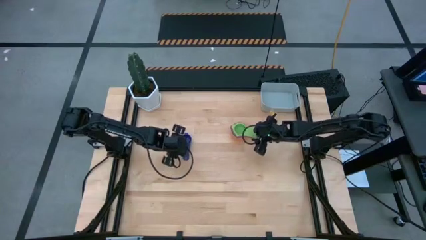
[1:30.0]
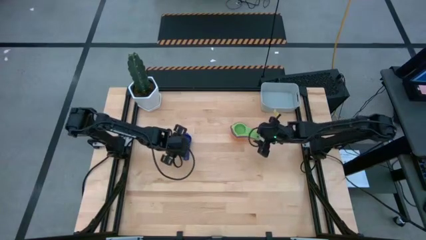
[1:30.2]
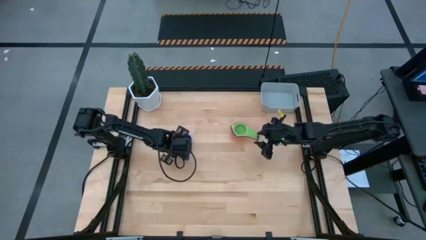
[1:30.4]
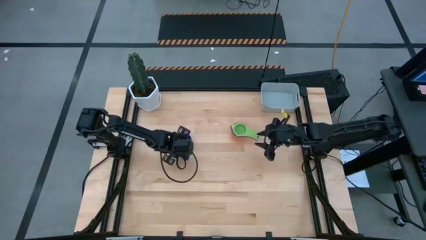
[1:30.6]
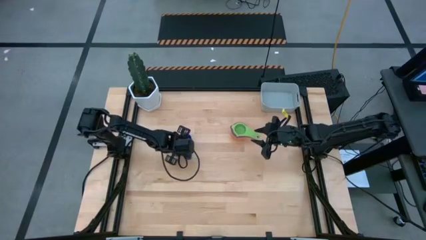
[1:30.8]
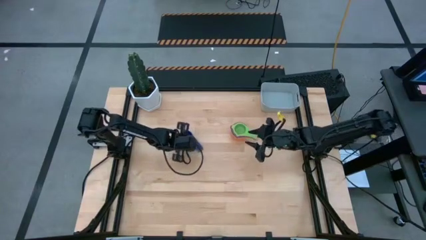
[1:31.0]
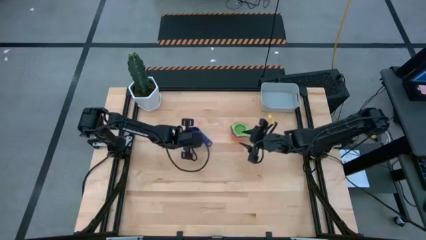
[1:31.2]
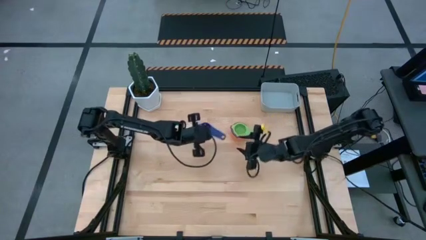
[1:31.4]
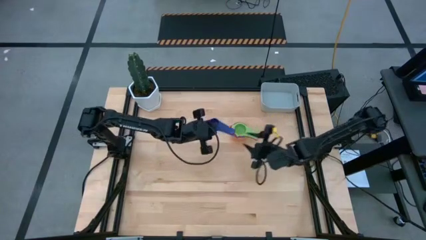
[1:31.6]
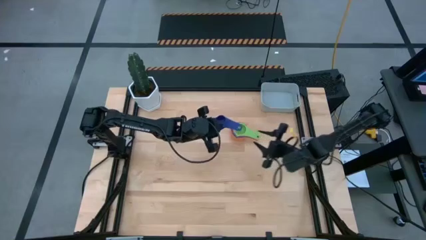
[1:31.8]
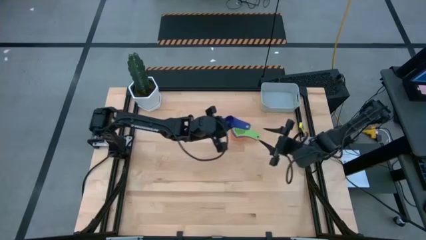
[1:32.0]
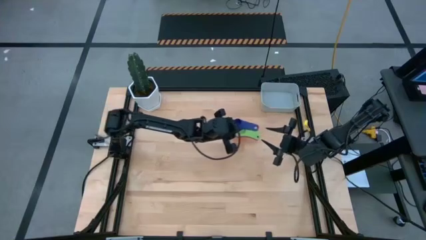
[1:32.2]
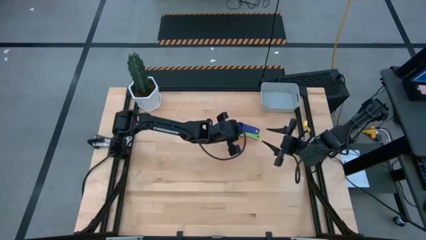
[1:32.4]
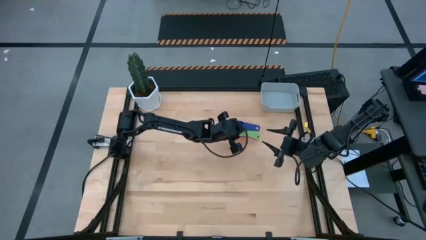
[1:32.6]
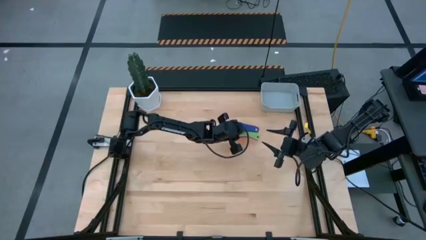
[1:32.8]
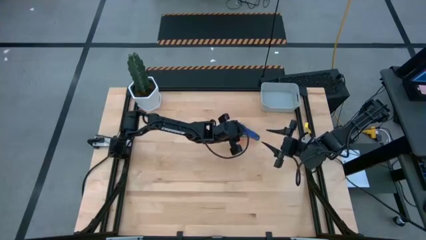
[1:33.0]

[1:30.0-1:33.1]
Task: Nest measuring cups in basket
Stack the dark blue measuring cup on top of the green measuring cup

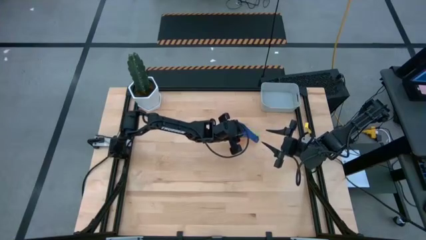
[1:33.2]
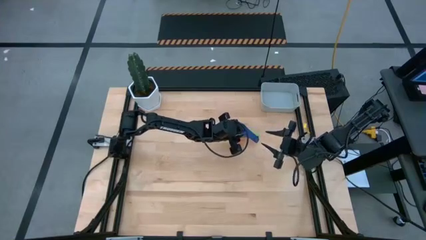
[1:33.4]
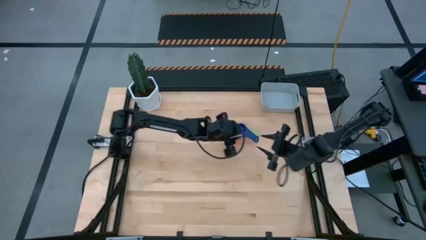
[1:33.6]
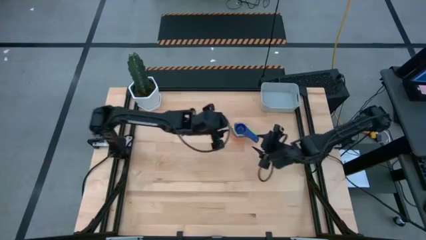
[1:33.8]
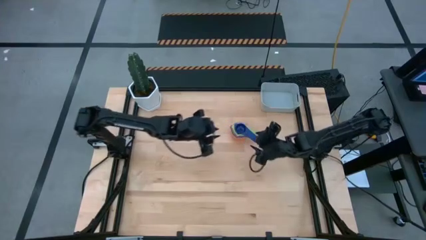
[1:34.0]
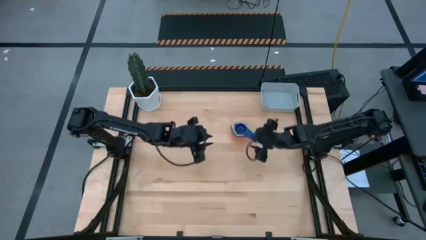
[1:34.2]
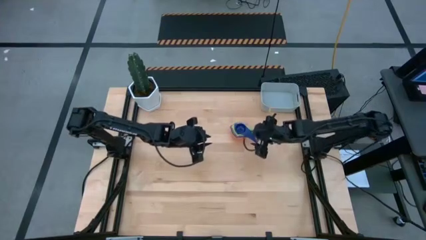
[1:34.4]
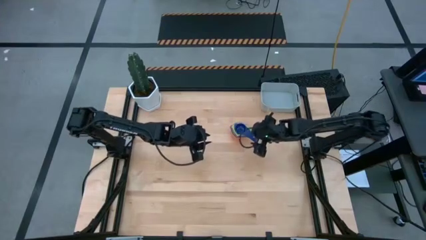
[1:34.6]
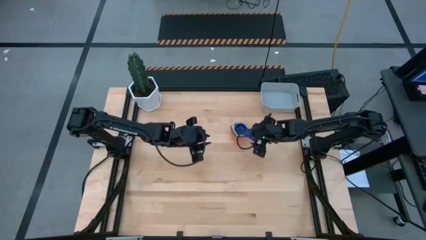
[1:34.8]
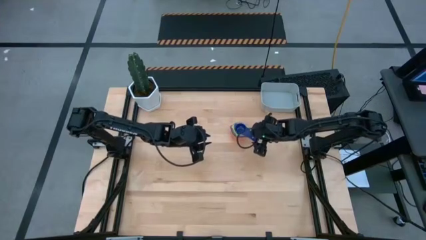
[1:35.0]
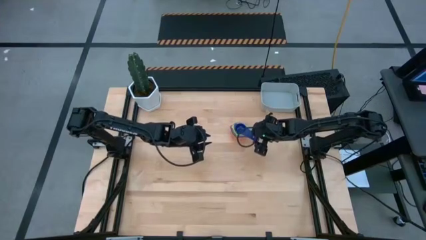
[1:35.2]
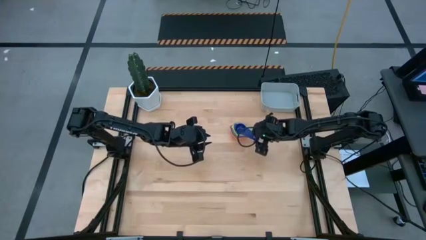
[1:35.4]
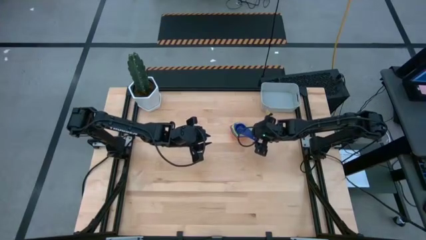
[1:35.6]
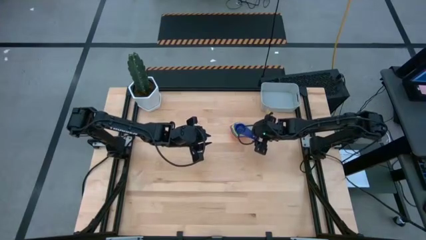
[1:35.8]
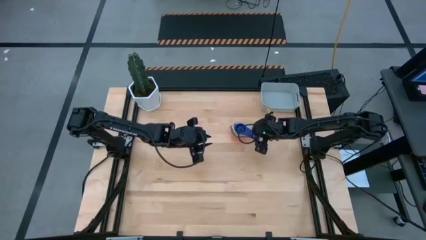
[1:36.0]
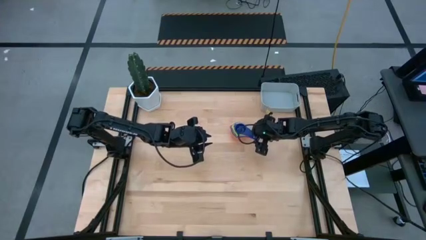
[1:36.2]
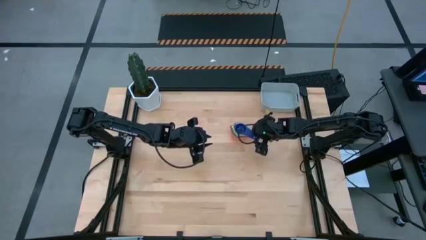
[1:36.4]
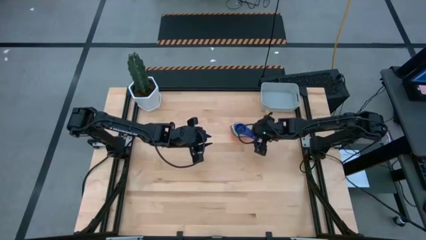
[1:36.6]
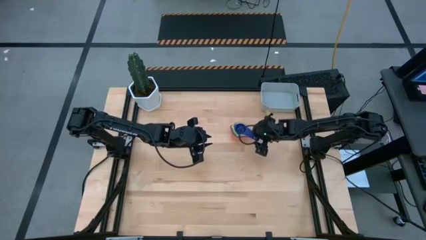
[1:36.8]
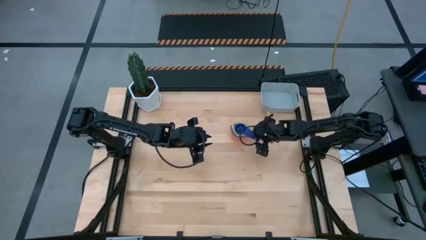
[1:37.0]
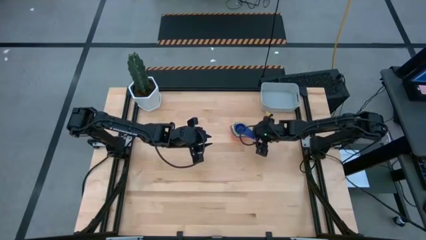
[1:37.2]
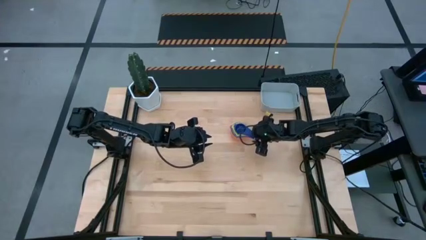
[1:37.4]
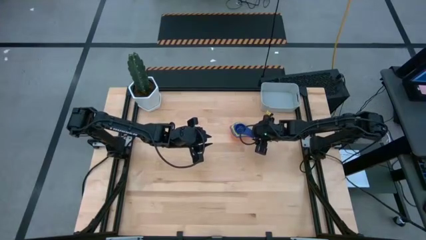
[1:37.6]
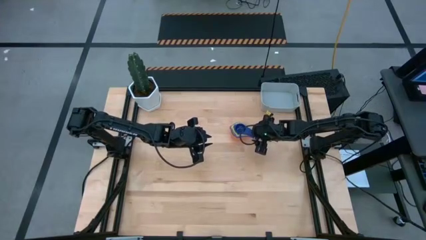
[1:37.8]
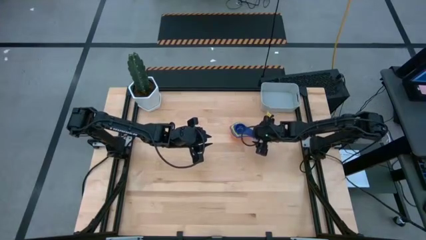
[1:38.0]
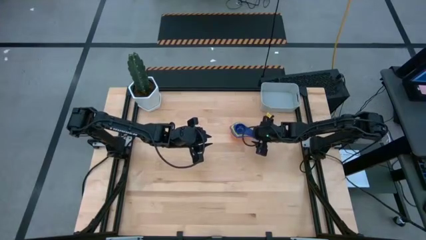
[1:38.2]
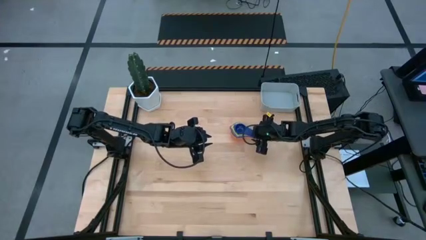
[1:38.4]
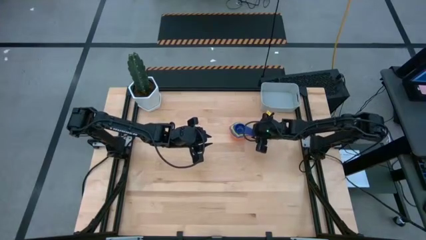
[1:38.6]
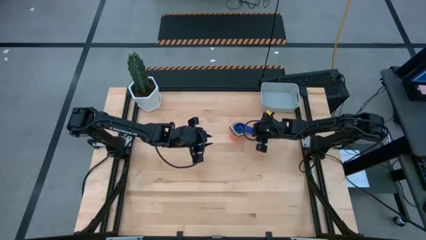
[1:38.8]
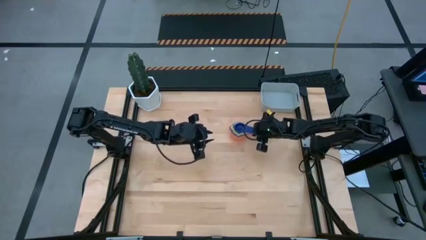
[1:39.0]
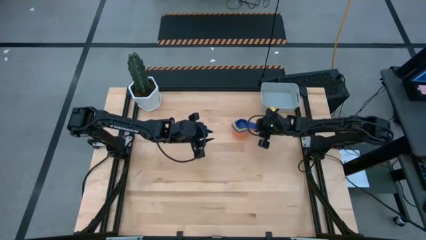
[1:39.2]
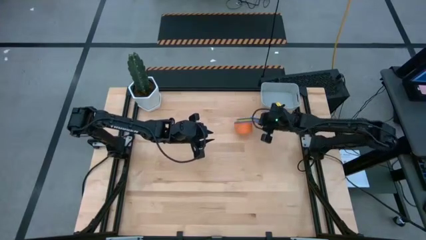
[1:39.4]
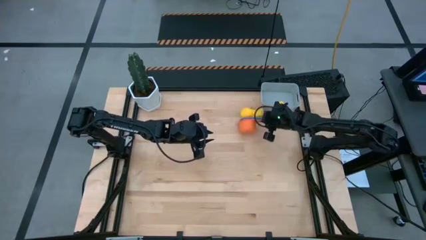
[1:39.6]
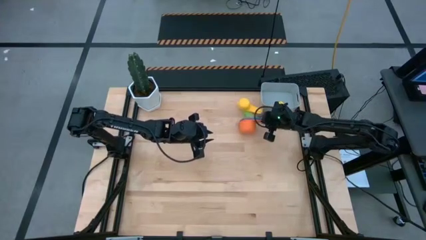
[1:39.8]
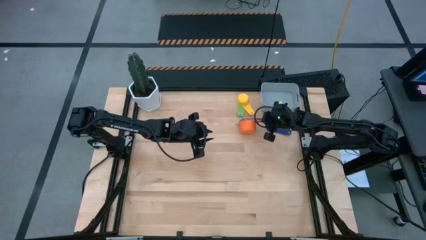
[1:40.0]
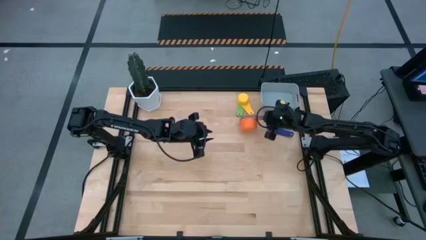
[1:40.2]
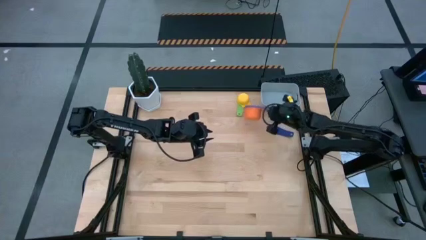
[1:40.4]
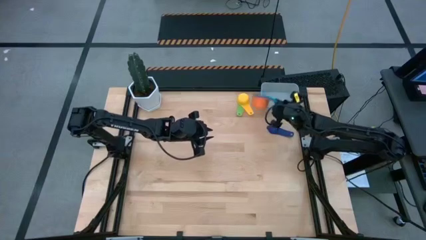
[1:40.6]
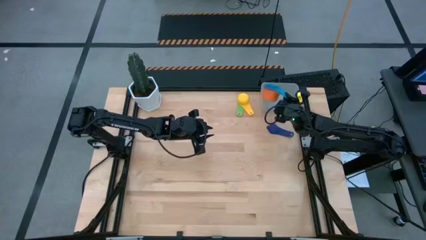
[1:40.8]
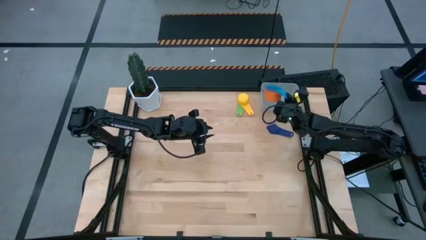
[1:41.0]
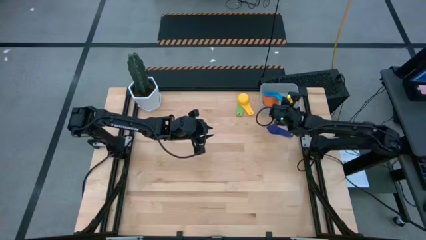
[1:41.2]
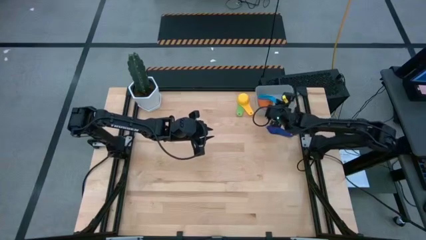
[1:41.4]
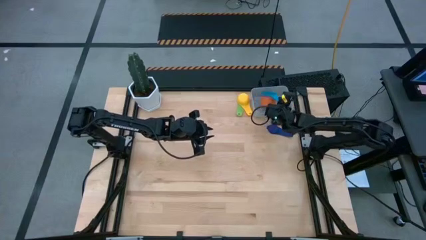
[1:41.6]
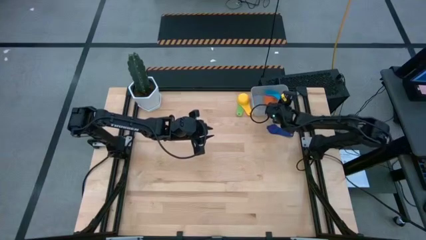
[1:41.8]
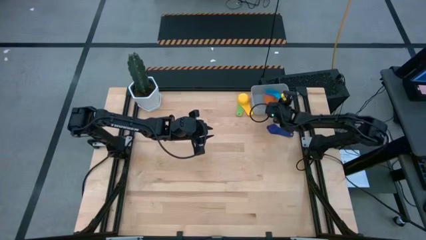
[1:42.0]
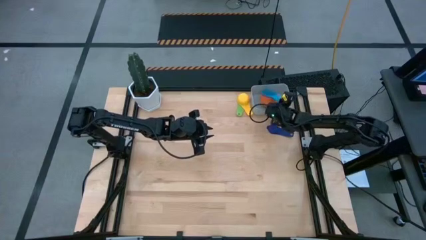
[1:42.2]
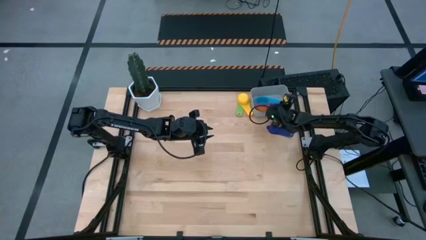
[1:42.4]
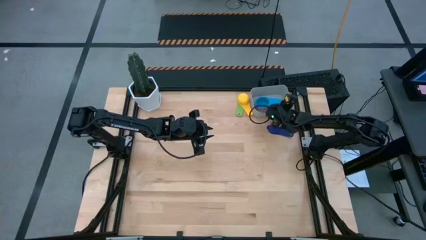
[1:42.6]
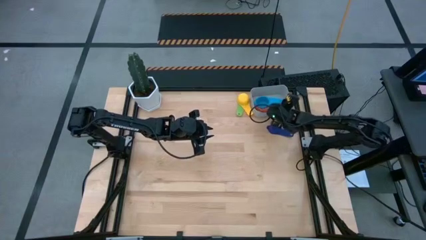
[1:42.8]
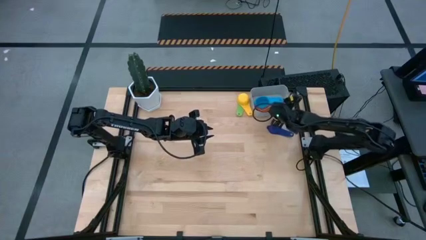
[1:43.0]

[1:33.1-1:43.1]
Put the stacked measuring cups into the gray bin

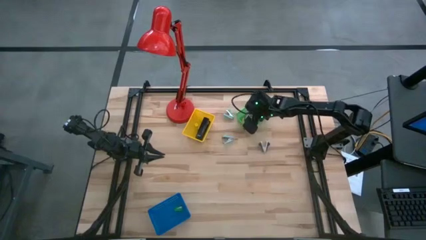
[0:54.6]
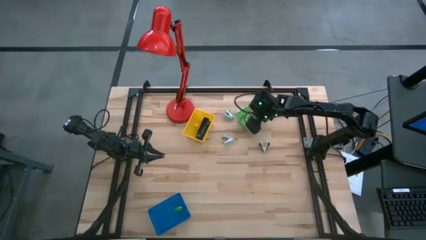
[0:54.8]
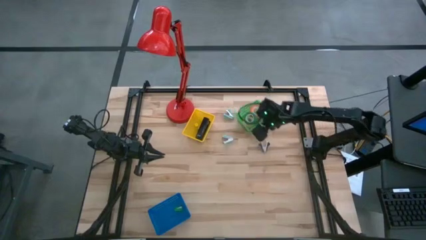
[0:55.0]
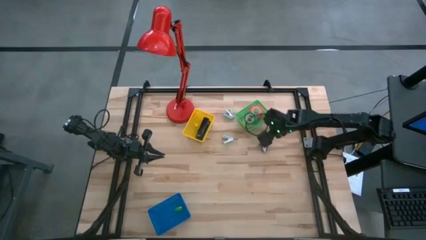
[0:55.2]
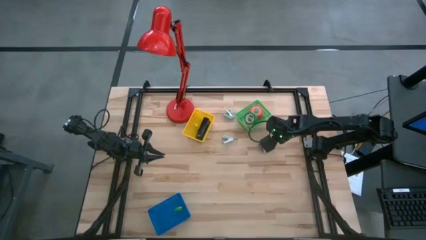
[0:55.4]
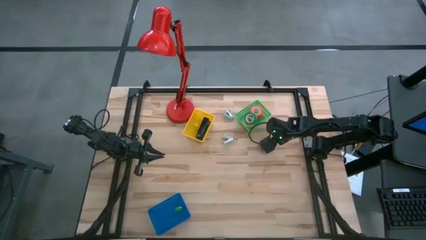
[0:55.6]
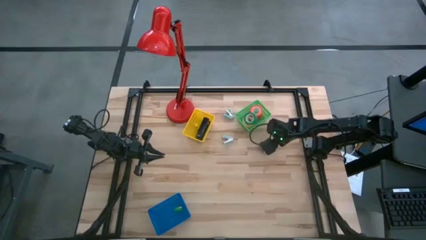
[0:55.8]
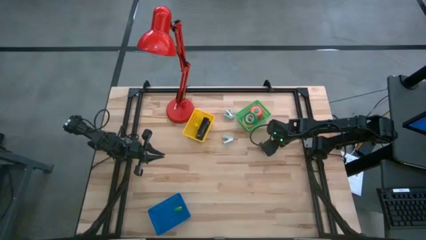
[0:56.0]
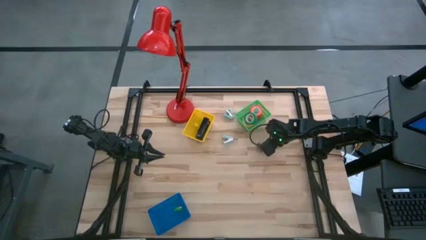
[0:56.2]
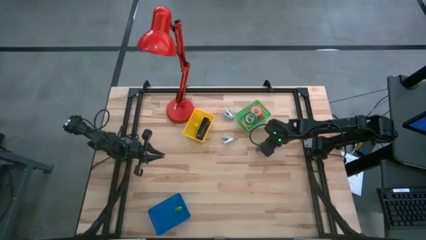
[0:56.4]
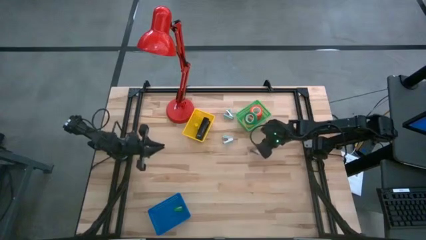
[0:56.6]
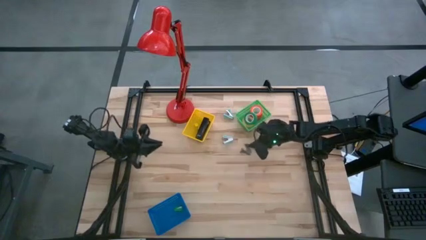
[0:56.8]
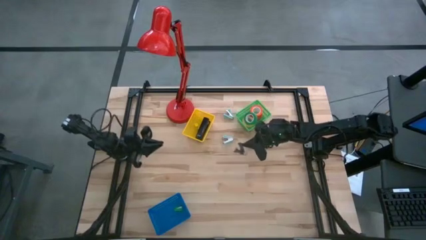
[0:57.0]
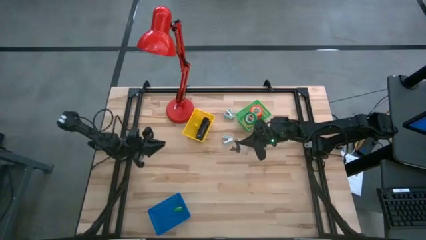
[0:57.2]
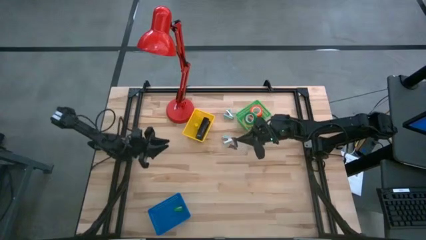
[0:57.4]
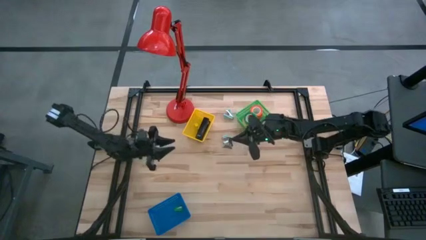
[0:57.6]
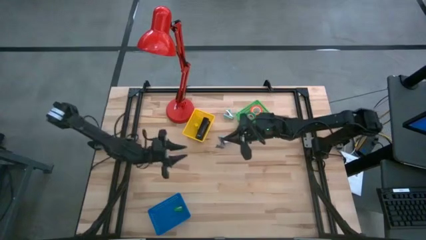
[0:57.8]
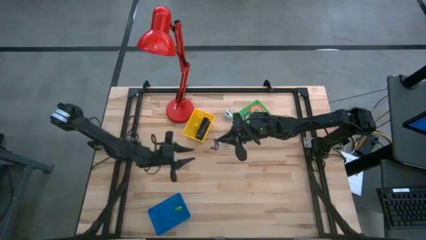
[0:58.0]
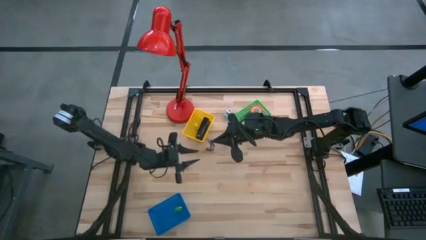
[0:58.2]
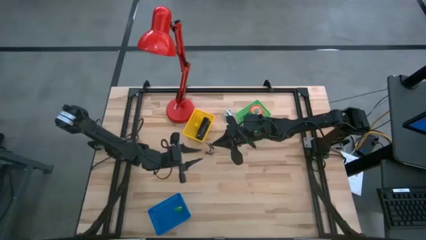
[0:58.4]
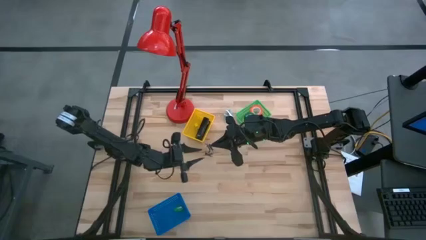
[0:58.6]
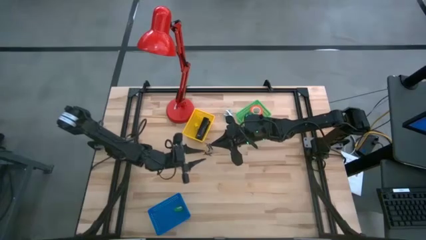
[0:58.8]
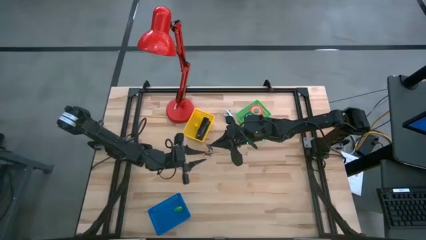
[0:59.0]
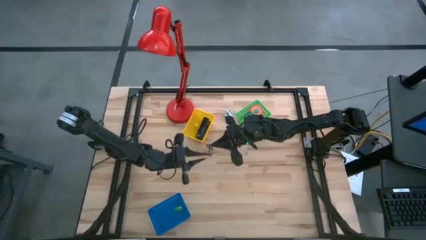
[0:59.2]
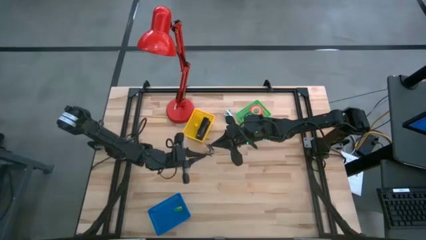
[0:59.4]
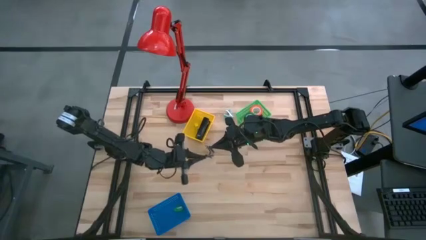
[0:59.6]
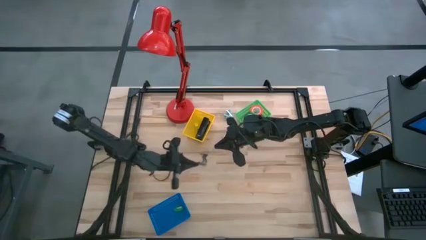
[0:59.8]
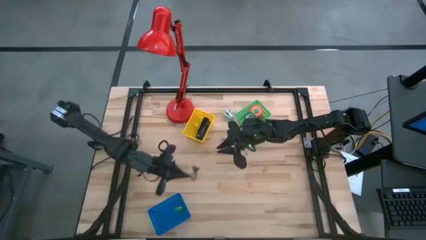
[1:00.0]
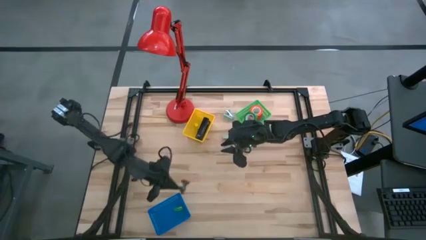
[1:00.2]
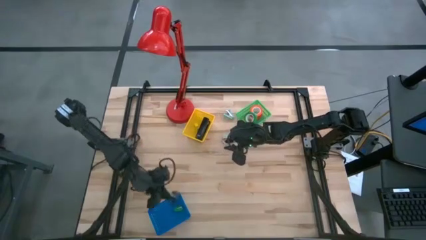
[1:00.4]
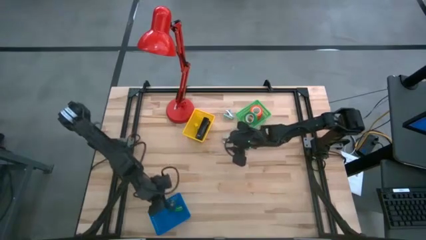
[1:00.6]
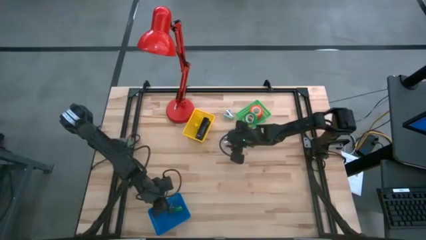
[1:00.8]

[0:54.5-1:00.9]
Task: Pick and place Stapler, Stapler remover, tape
Put the black staple remover into the blue bin
